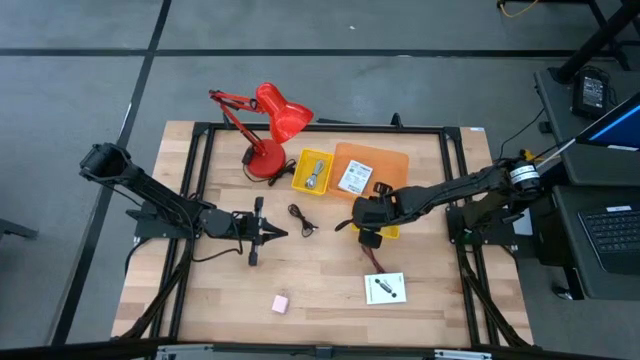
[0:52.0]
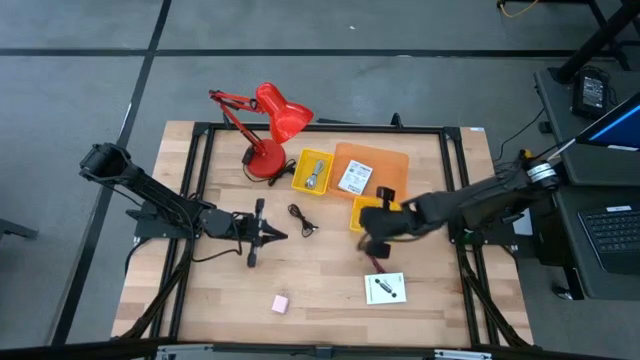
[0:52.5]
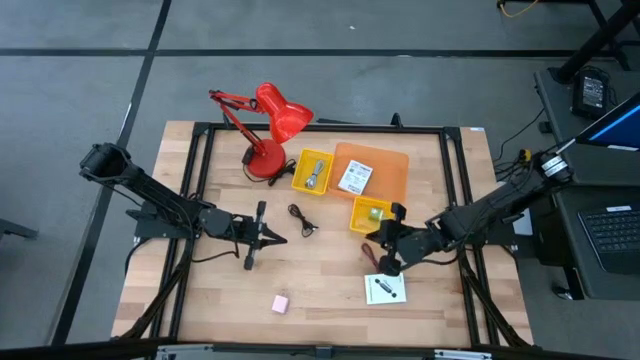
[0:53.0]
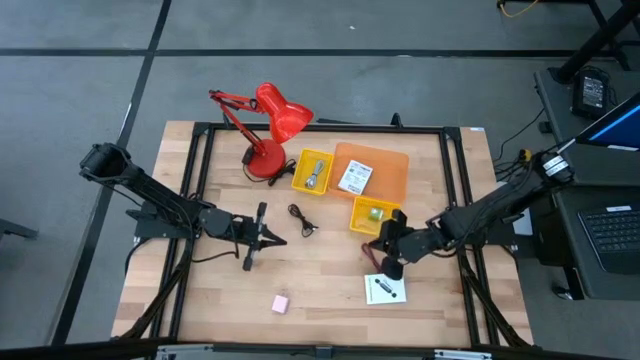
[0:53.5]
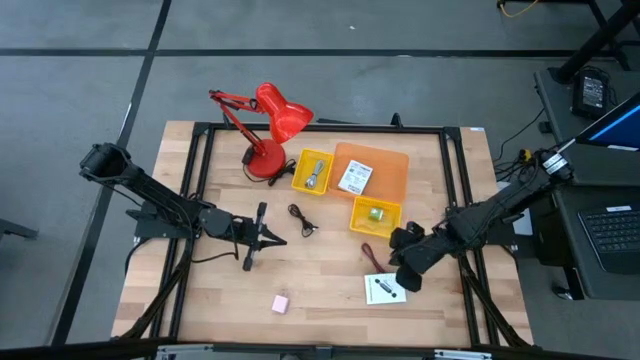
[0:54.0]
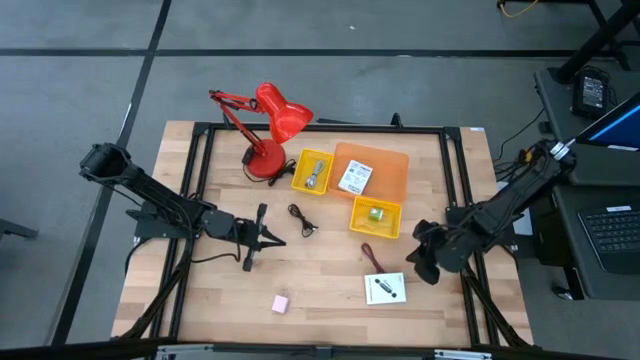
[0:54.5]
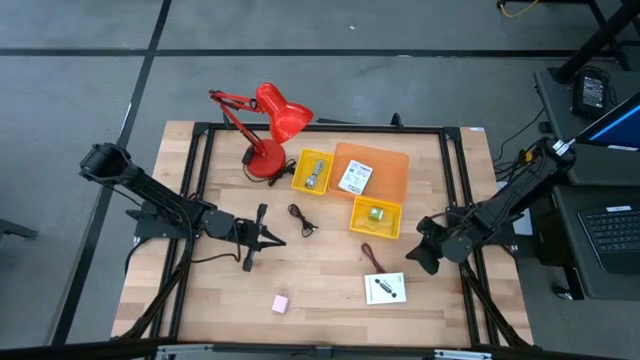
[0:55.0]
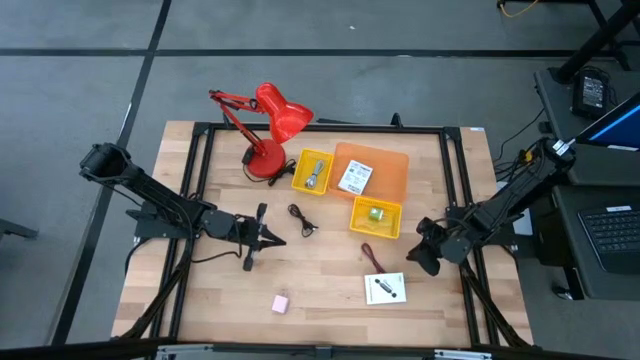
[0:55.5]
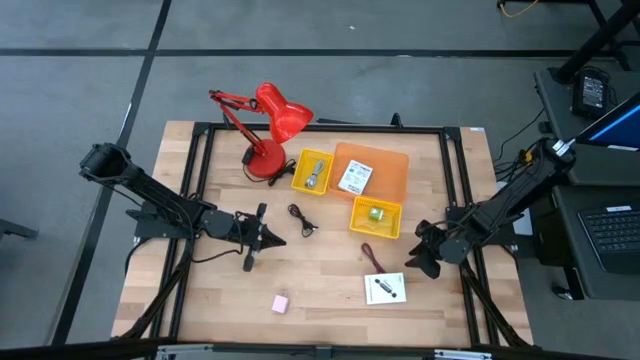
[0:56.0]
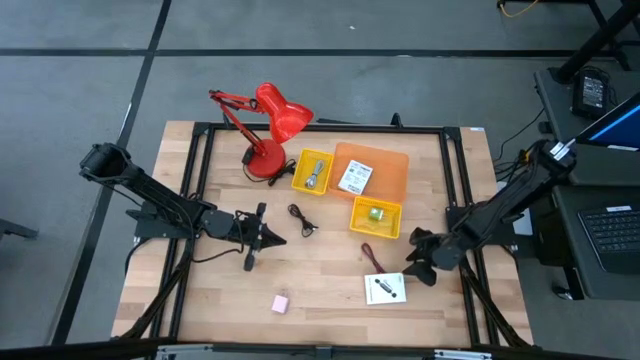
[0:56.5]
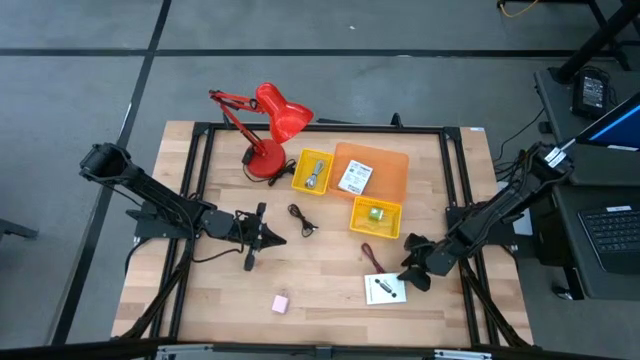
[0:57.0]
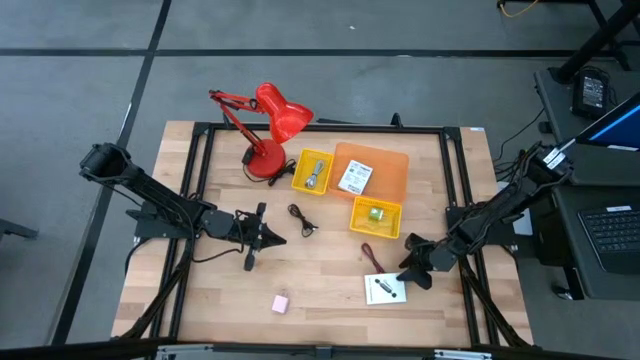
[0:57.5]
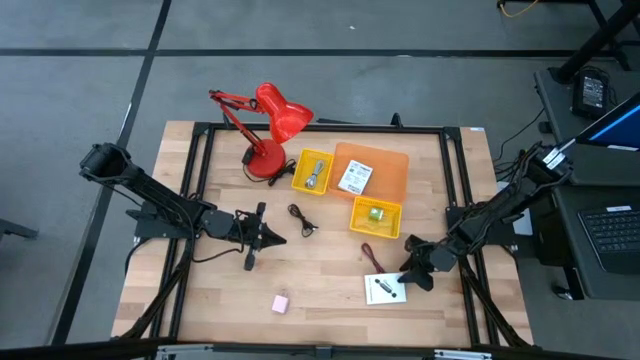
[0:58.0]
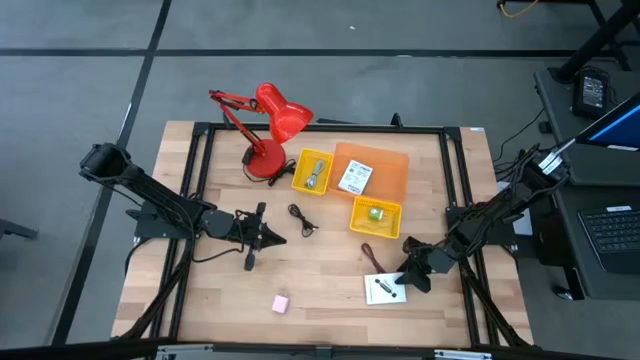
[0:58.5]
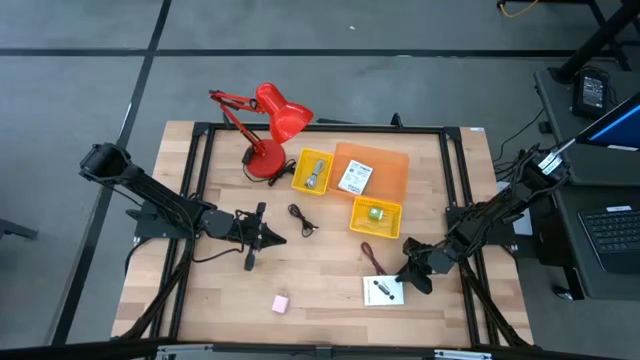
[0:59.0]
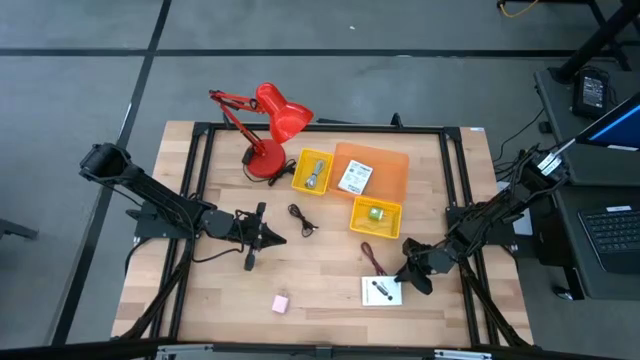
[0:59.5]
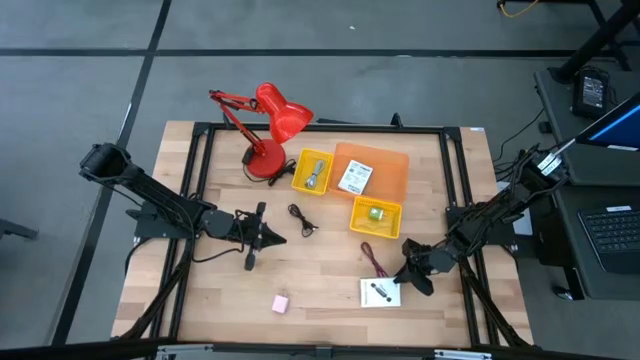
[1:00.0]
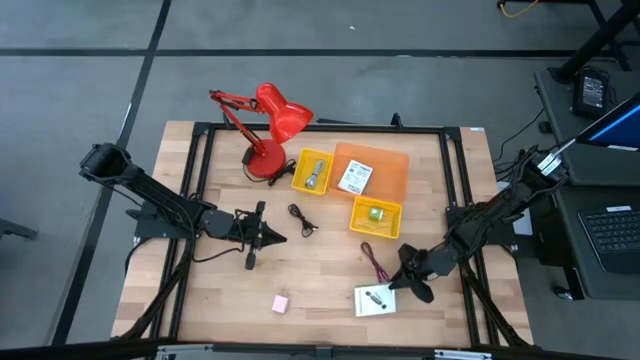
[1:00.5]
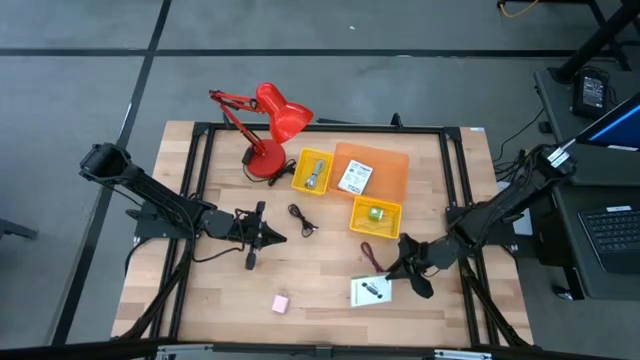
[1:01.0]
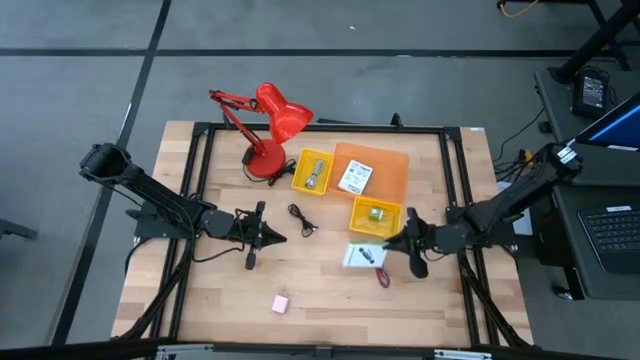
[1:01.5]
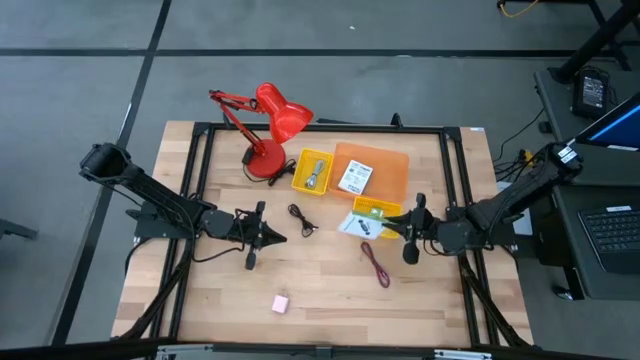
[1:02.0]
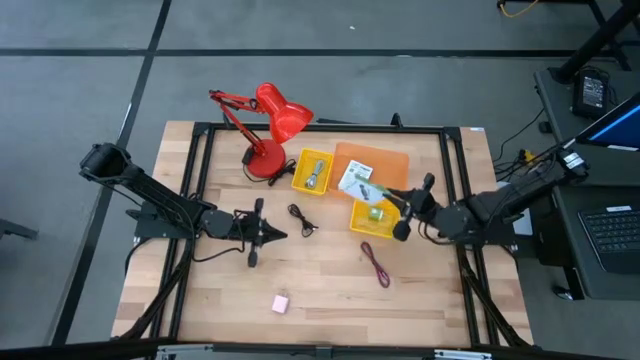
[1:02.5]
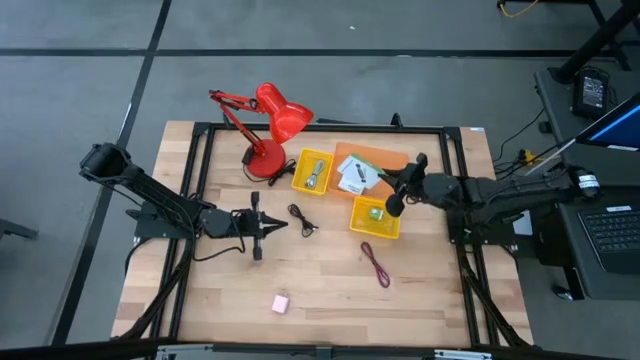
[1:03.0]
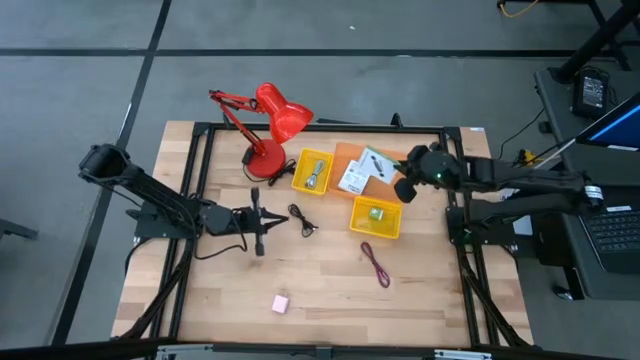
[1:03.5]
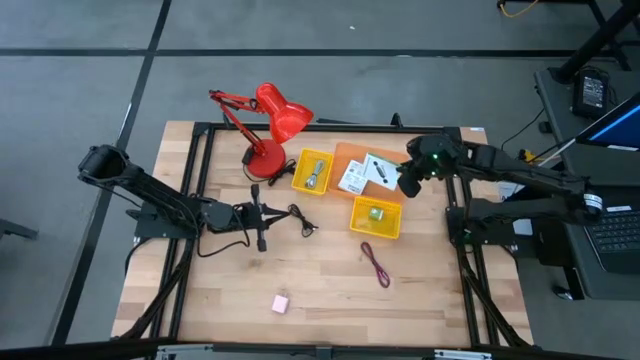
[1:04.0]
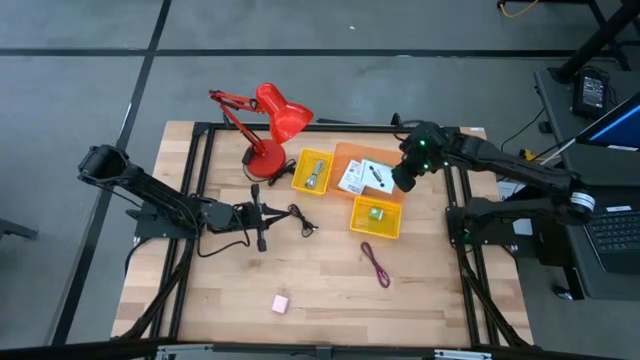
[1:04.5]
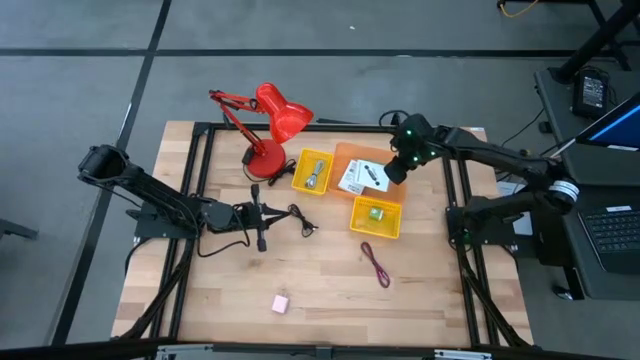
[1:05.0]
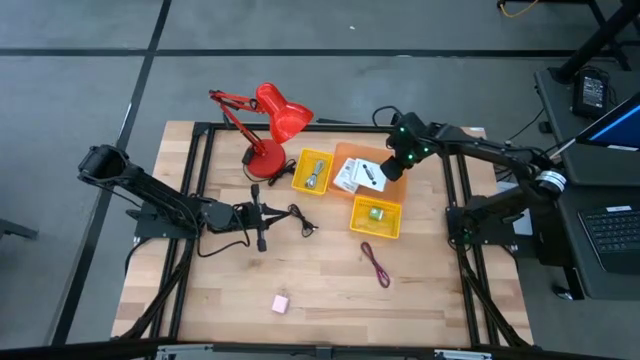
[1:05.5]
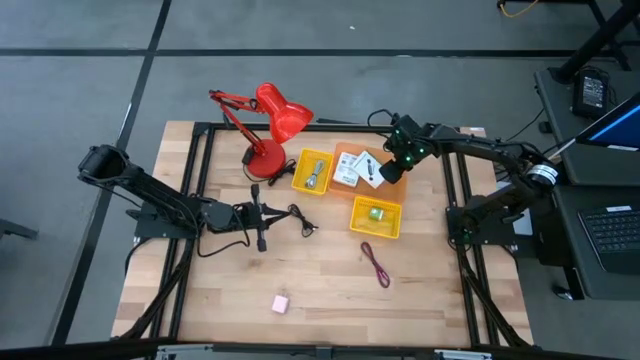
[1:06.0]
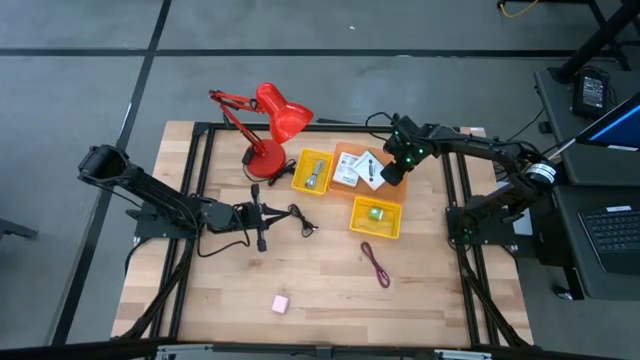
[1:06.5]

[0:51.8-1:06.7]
Task: Pick and place items into bin
Put the white box into the orange bin

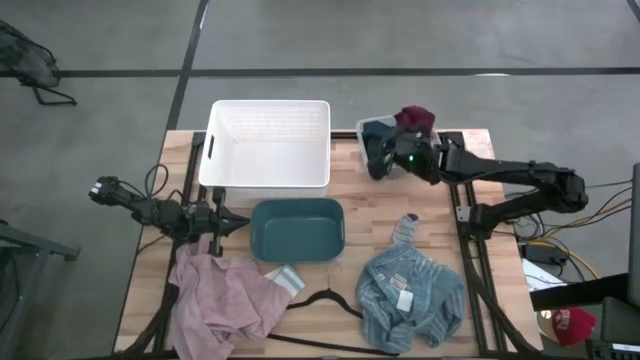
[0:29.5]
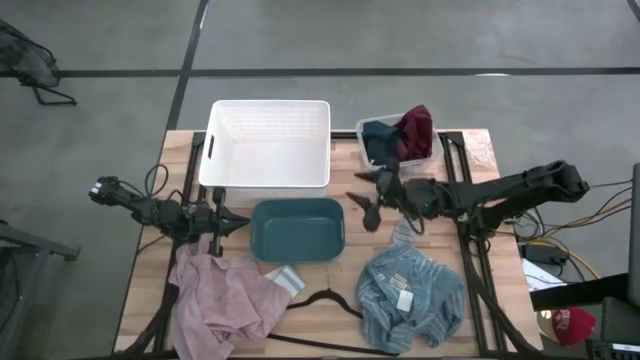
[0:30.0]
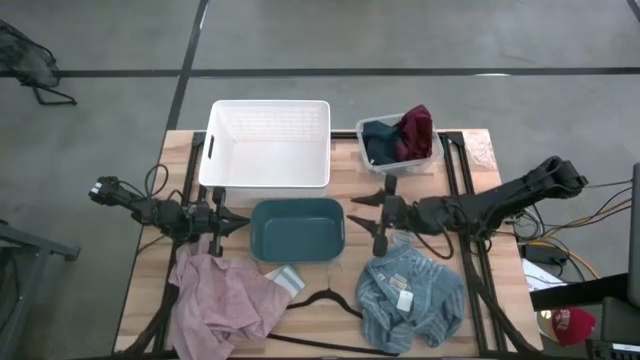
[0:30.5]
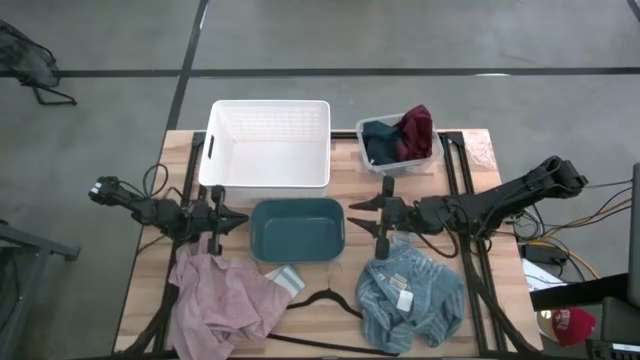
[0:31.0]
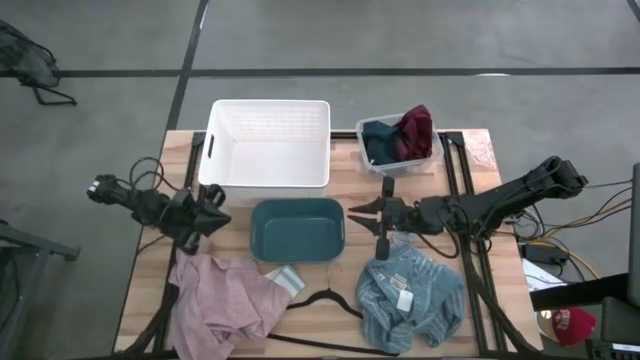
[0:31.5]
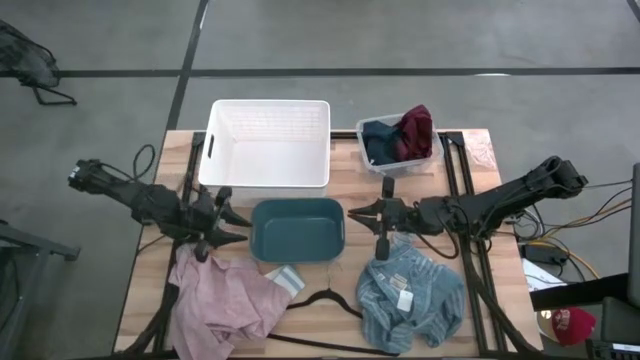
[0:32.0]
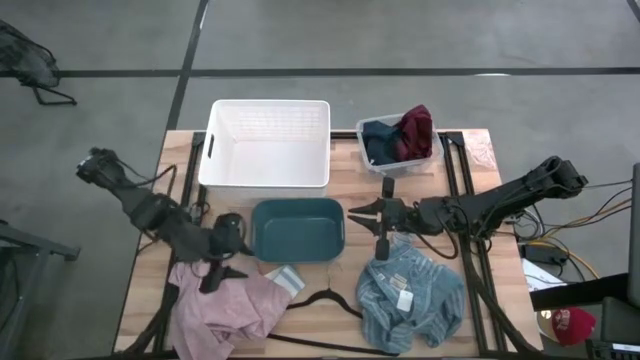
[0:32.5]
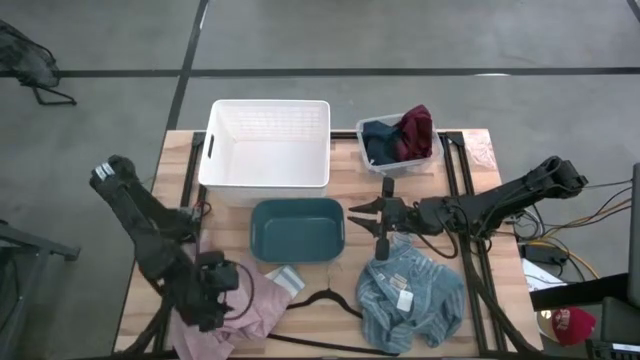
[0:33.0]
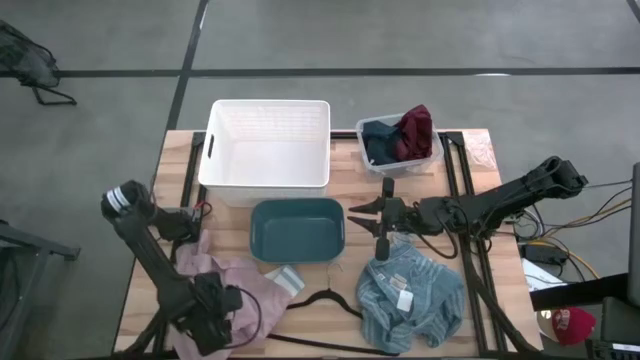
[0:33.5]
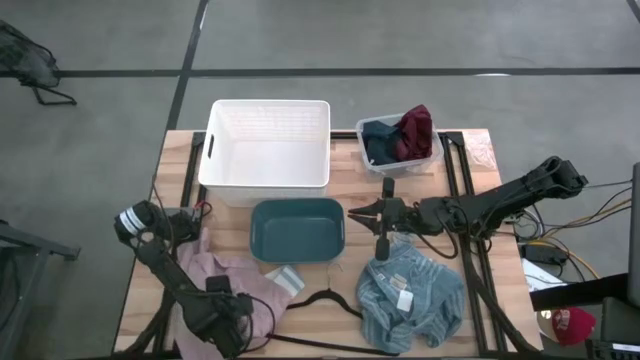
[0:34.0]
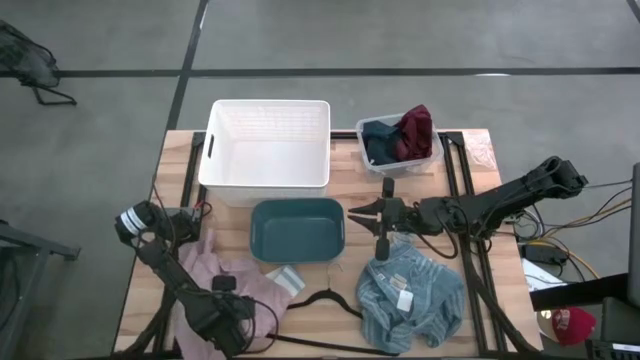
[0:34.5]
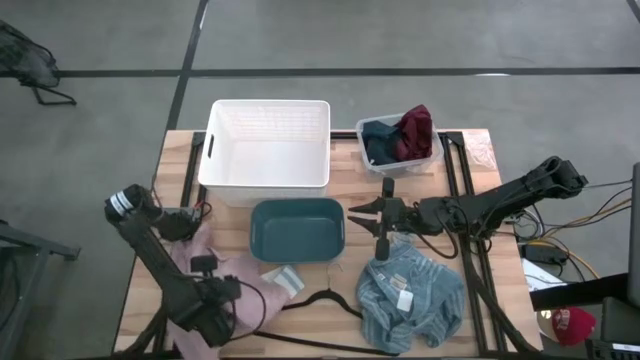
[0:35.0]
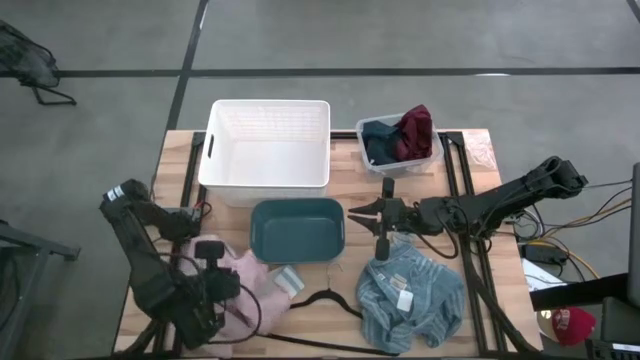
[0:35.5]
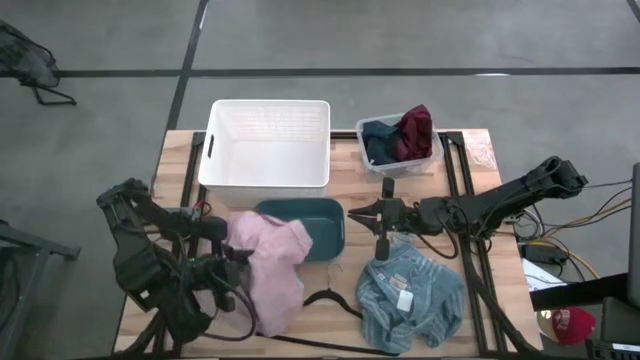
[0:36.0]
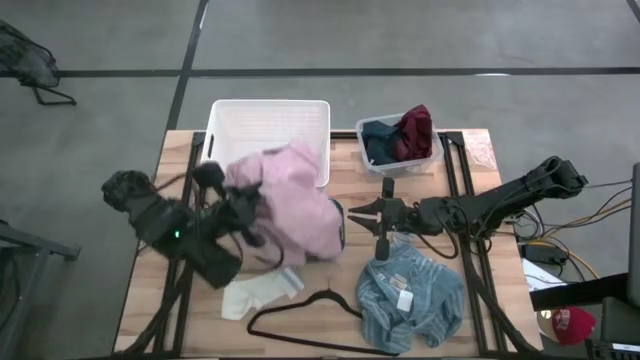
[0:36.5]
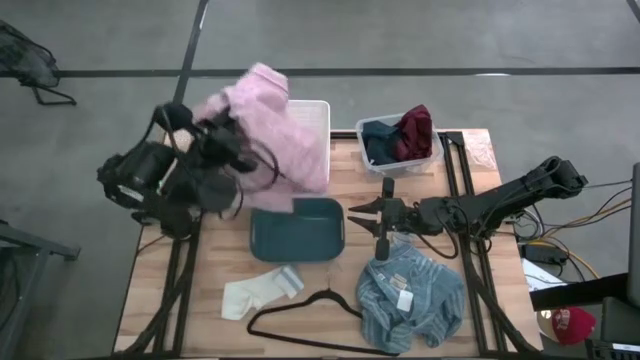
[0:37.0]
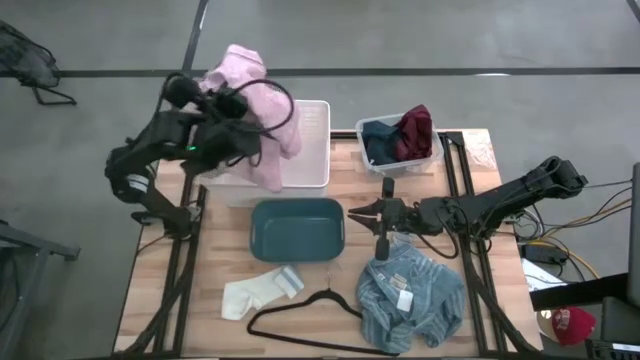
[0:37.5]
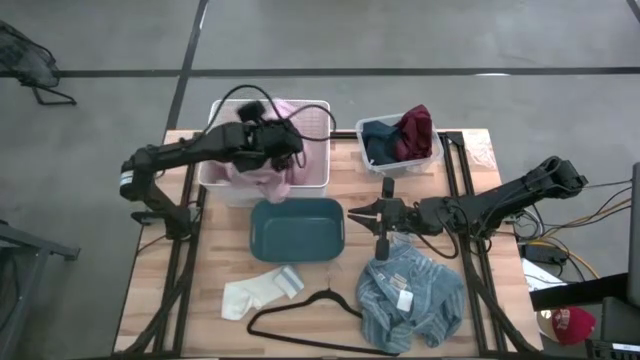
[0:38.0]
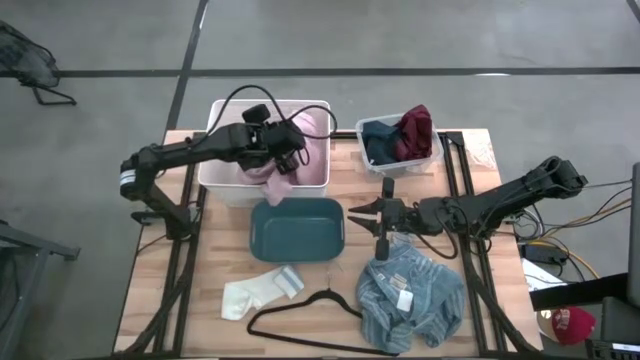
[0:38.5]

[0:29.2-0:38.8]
Task: Pick & Place Cloths
Put the pink polo shirt into the white bin
